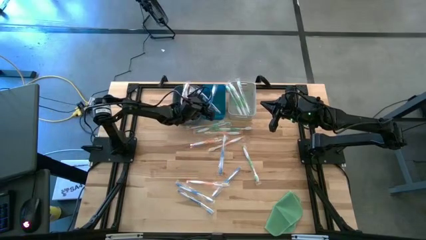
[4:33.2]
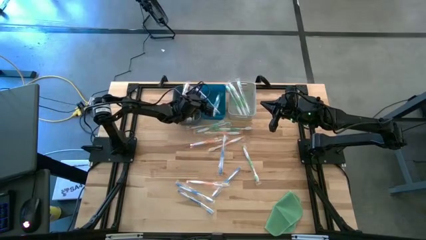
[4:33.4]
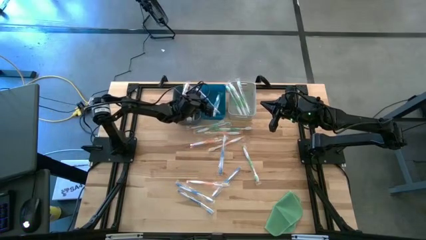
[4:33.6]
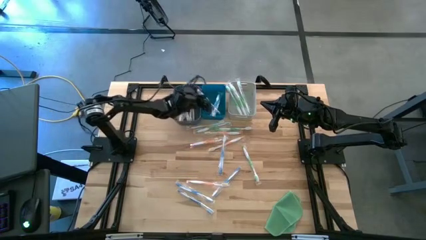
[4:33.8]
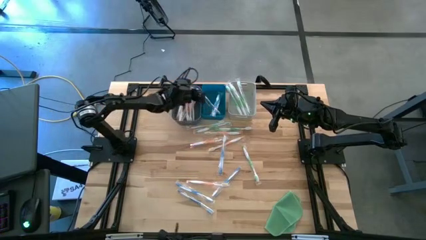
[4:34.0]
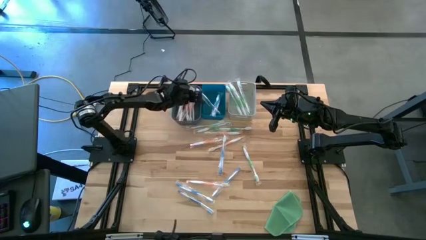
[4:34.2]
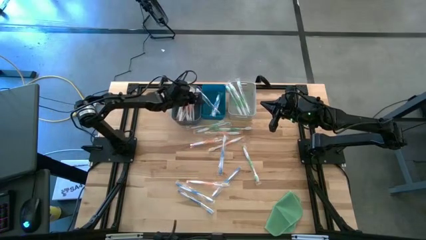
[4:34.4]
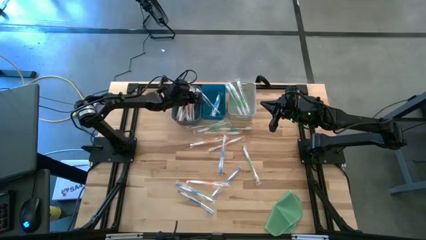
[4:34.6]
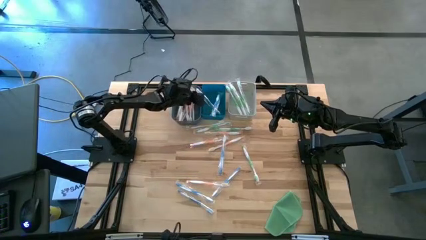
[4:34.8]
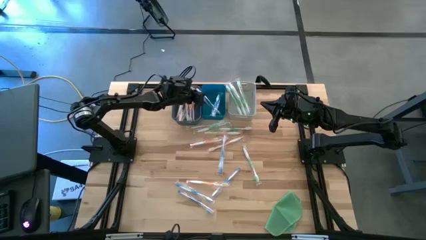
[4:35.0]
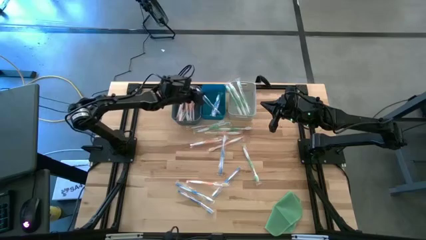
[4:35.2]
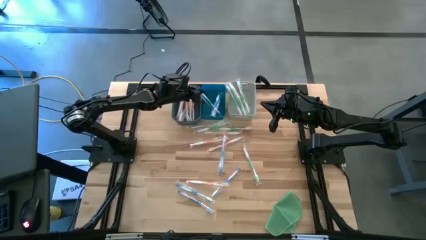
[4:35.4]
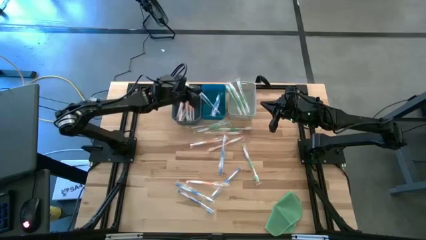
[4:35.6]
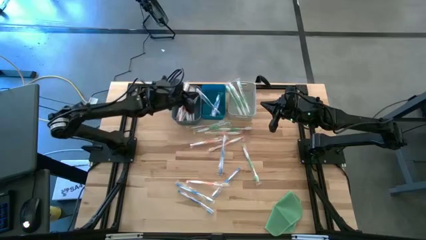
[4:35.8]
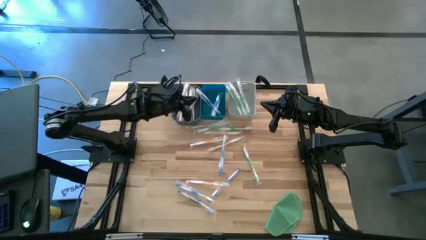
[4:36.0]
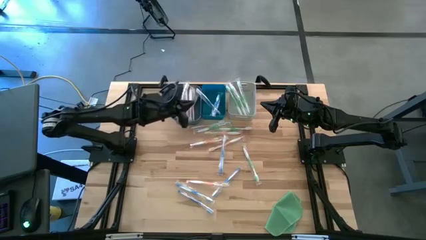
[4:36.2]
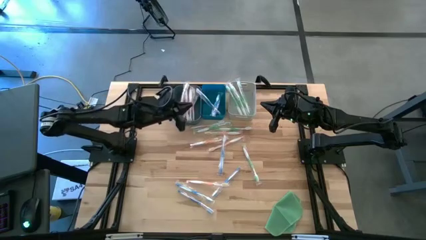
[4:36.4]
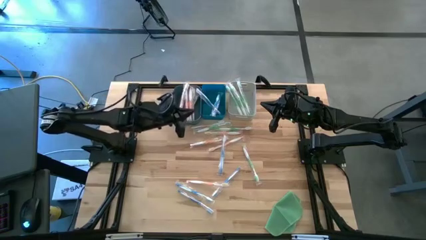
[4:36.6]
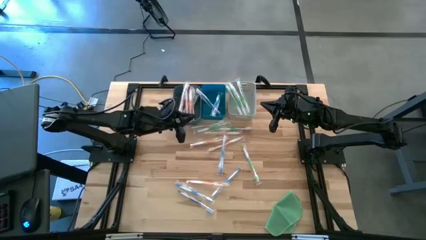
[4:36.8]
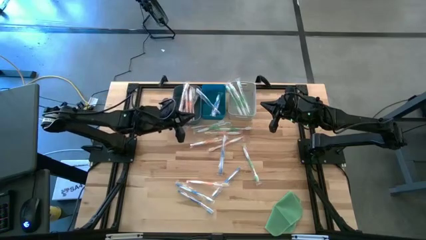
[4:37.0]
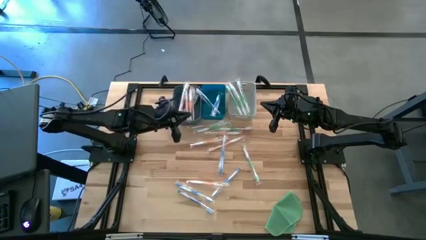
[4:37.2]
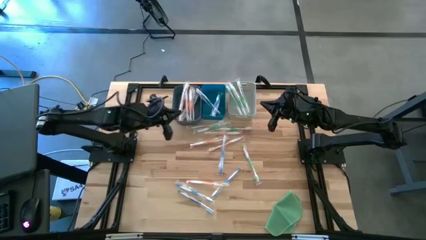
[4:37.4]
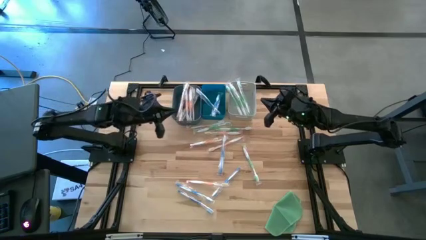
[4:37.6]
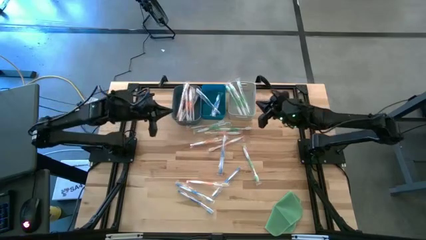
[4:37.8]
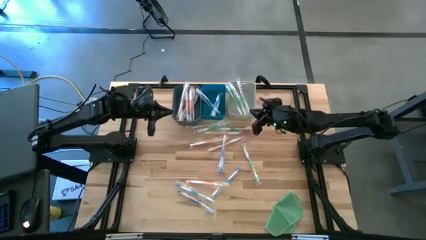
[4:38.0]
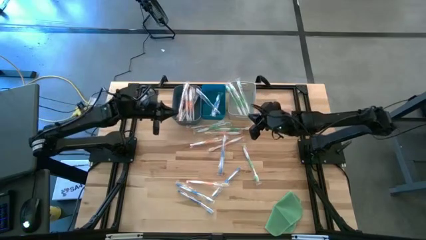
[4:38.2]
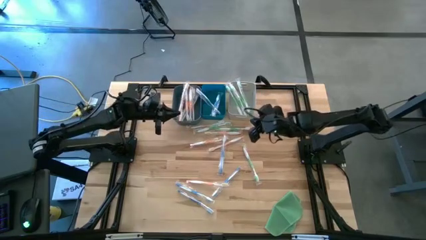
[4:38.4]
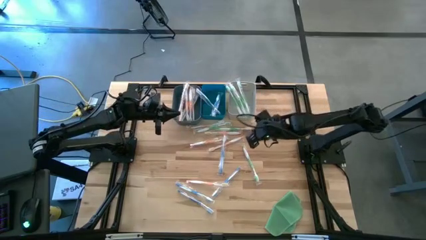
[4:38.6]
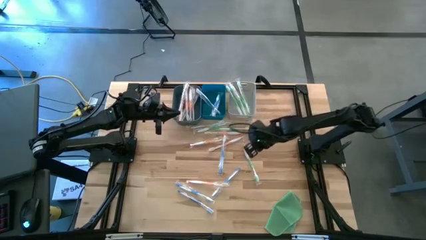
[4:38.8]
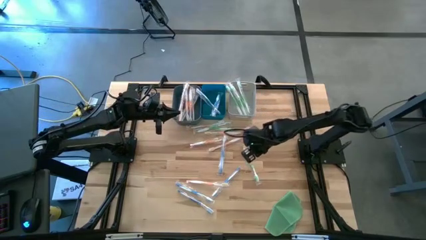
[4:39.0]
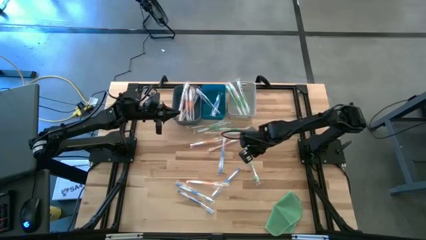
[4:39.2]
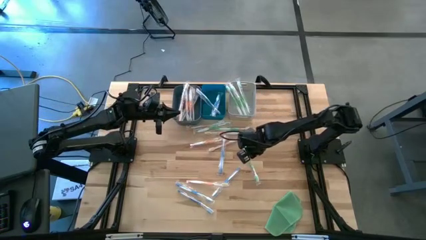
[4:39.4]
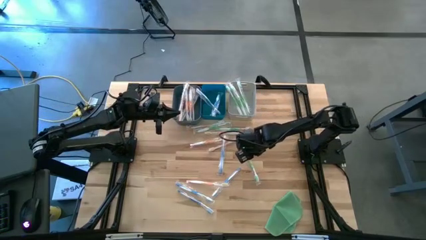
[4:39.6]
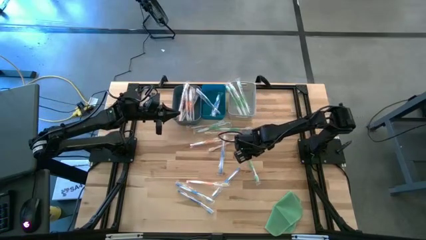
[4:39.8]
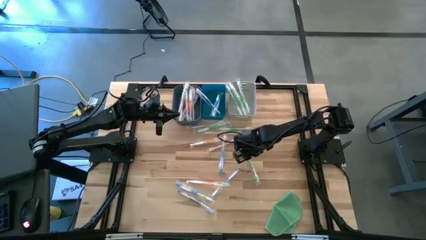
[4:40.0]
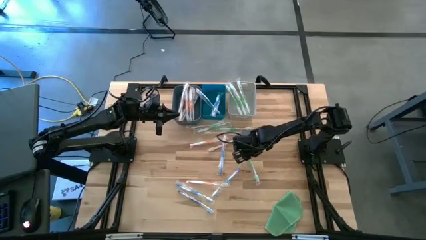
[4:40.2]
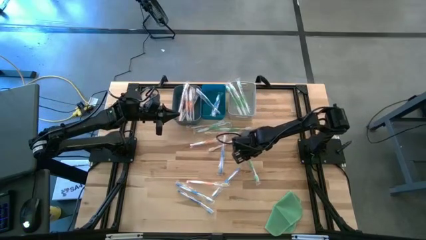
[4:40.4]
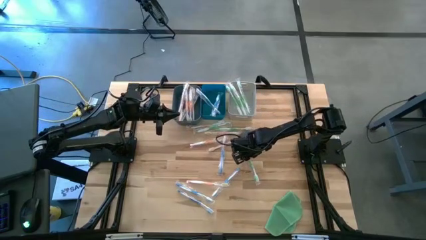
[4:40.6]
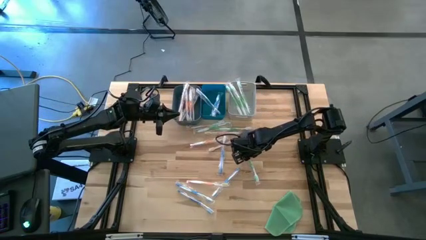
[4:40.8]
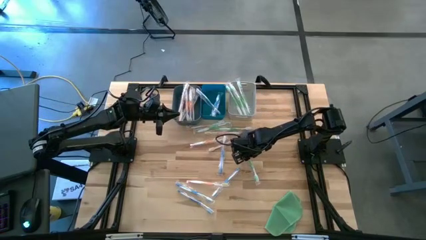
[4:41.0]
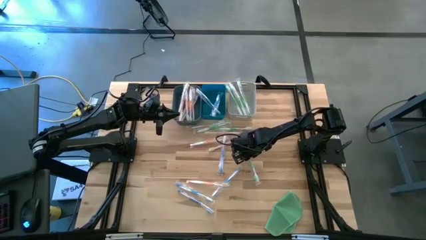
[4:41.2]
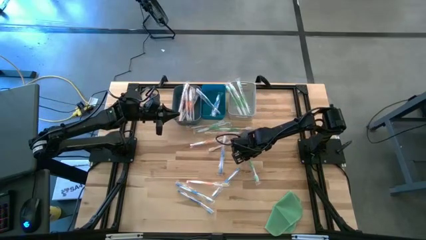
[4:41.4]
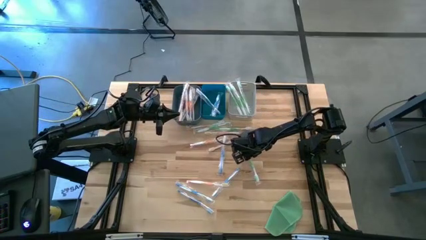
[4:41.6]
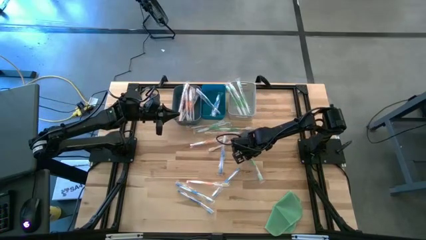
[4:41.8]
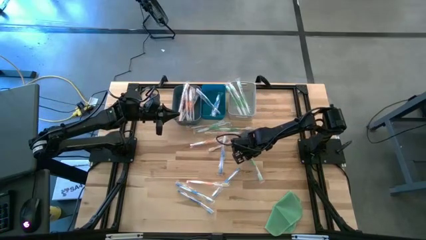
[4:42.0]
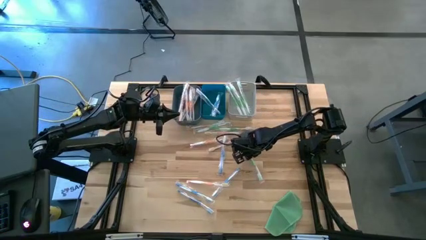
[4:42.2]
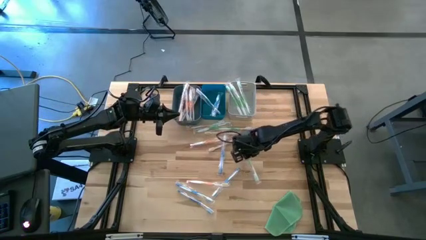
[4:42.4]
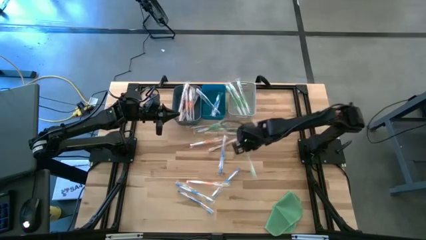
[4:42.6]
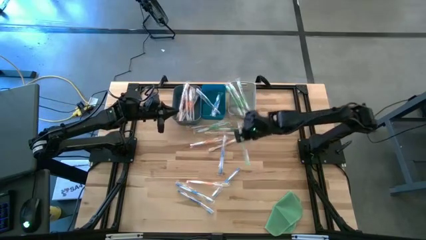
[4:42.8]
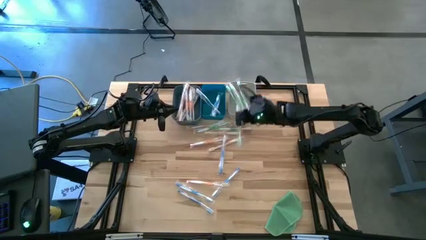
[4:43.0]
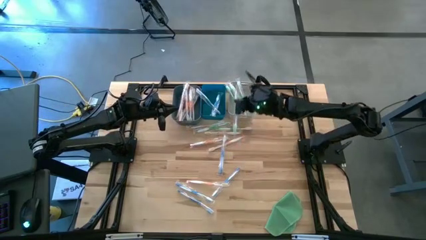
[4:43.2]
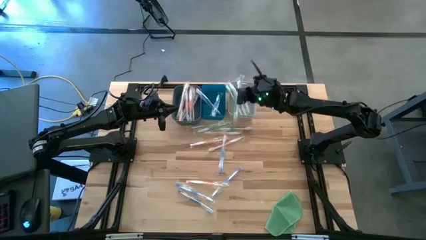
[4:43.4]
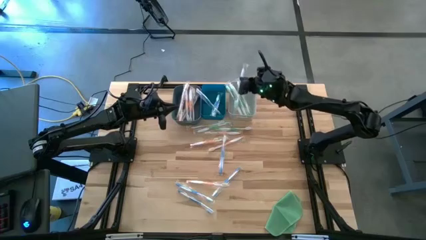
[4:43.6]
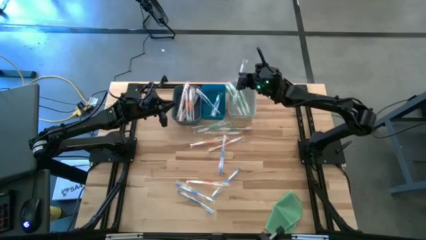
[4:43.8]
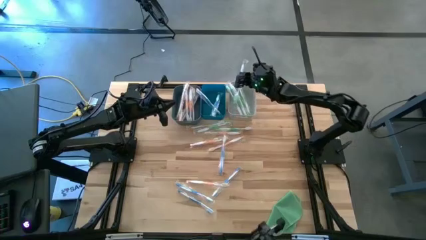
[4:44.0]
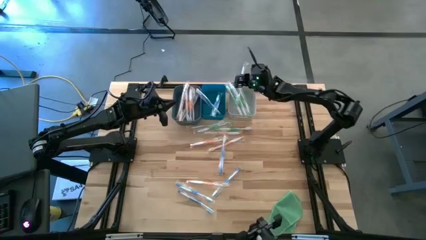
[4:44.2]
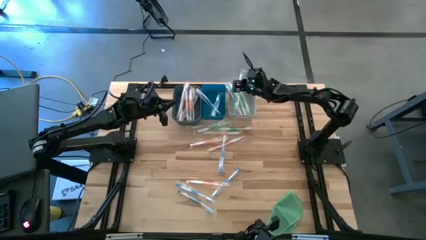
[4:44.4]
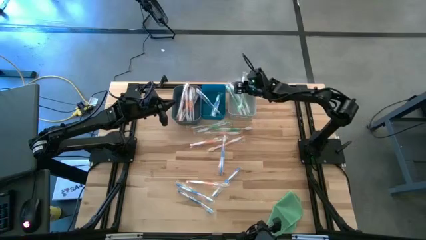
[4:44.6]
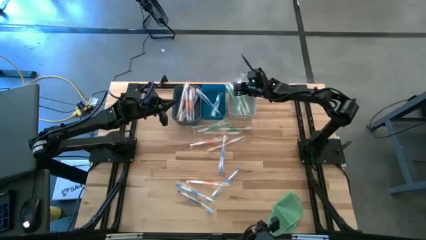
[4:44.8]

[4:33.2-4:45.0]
Task: Pick & Place Toothbrushes
Put the green toothbrush into the white bin

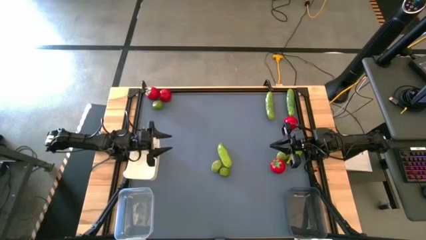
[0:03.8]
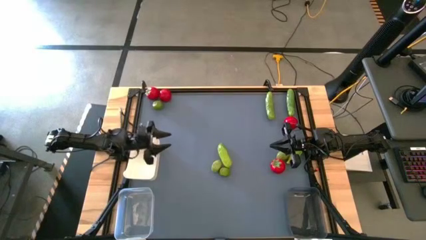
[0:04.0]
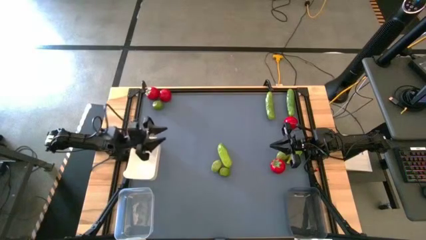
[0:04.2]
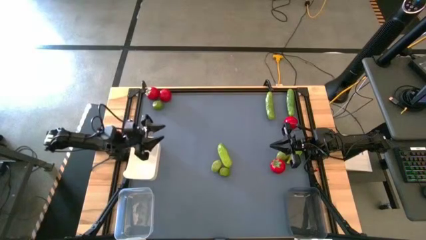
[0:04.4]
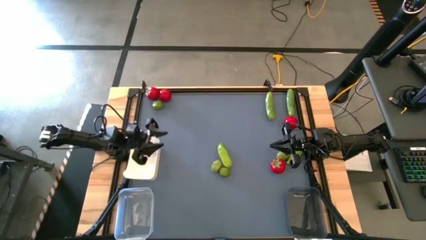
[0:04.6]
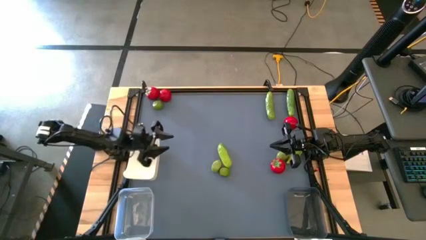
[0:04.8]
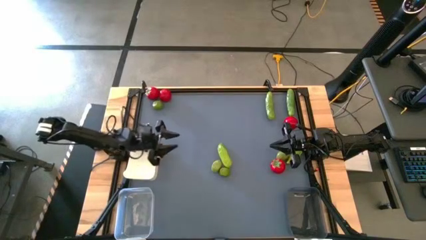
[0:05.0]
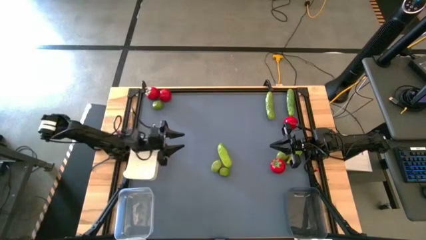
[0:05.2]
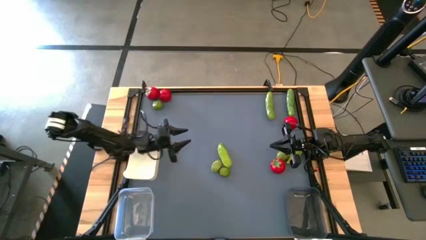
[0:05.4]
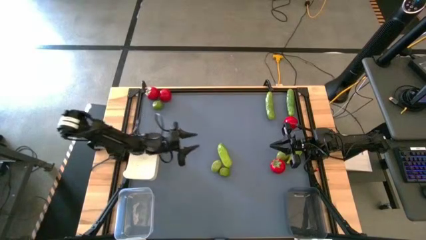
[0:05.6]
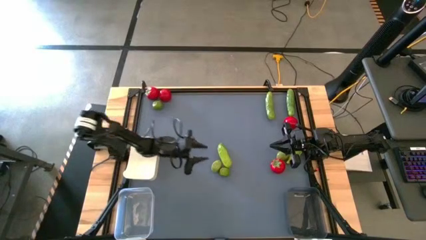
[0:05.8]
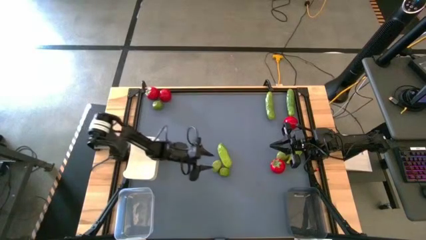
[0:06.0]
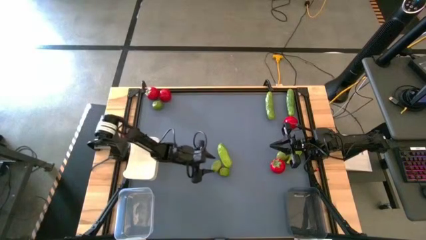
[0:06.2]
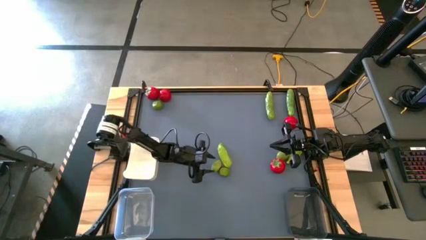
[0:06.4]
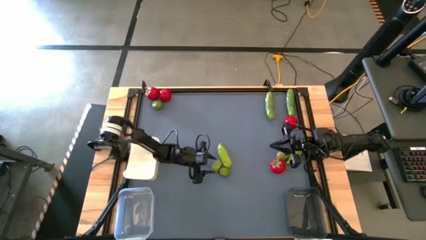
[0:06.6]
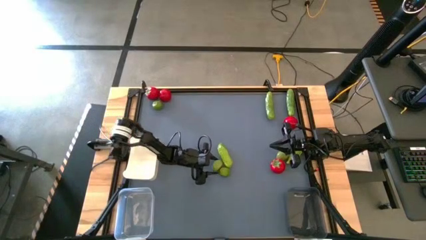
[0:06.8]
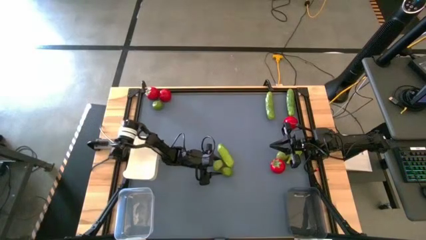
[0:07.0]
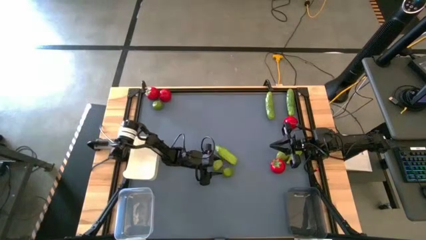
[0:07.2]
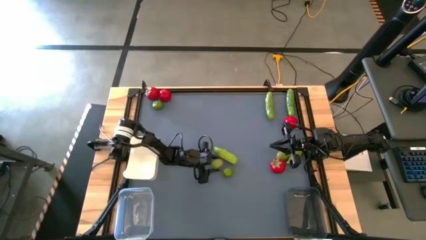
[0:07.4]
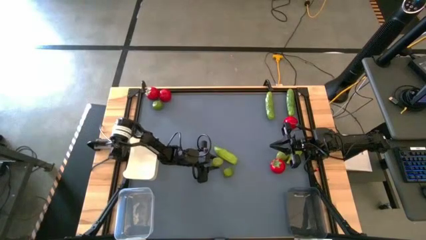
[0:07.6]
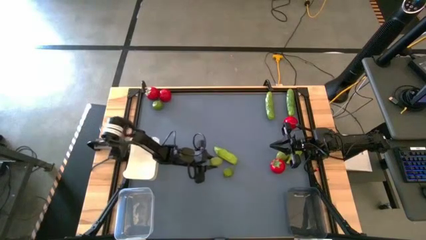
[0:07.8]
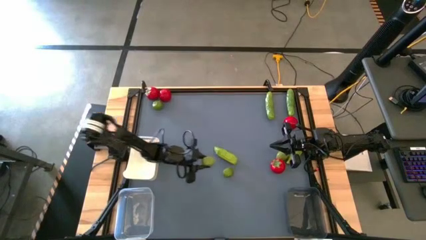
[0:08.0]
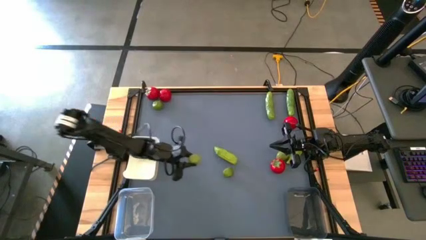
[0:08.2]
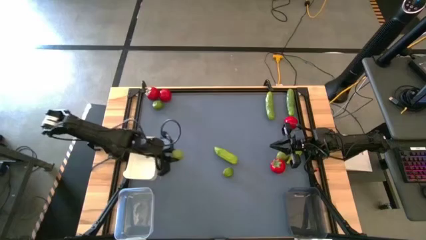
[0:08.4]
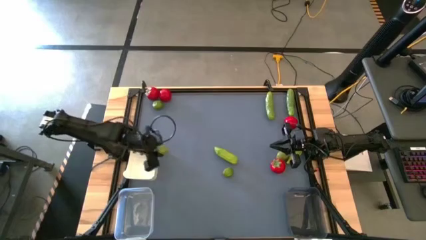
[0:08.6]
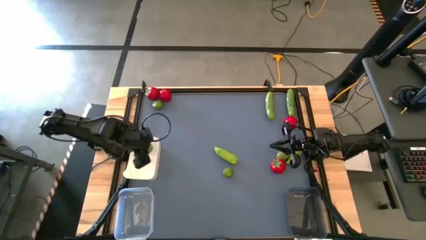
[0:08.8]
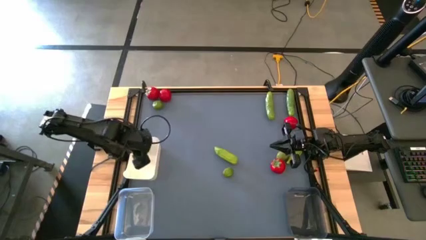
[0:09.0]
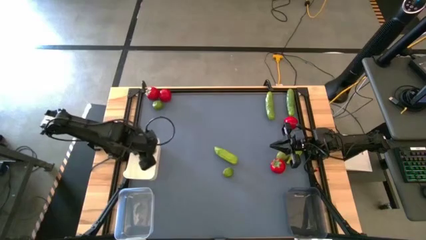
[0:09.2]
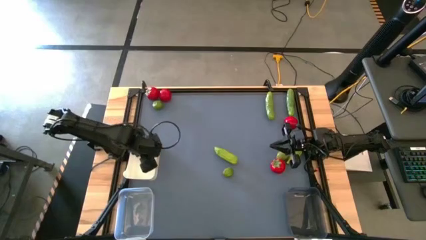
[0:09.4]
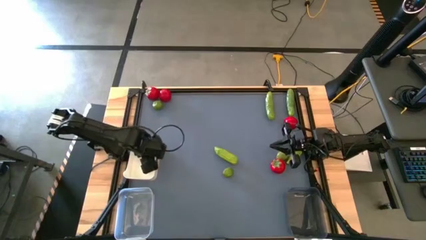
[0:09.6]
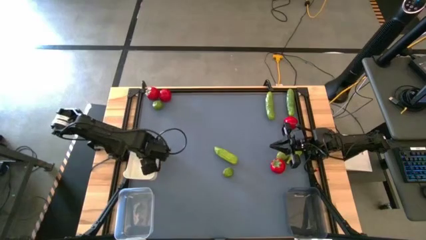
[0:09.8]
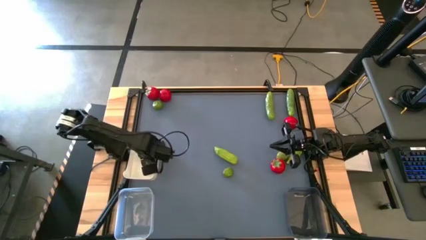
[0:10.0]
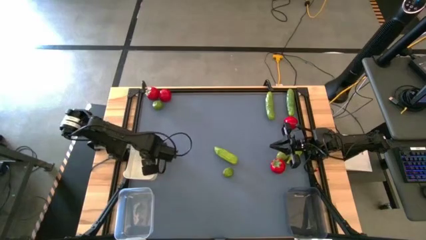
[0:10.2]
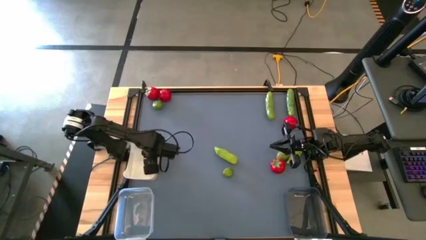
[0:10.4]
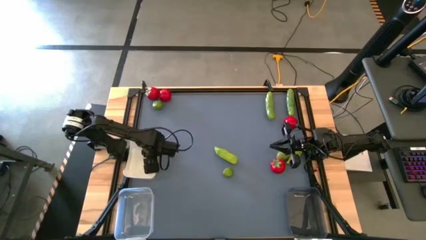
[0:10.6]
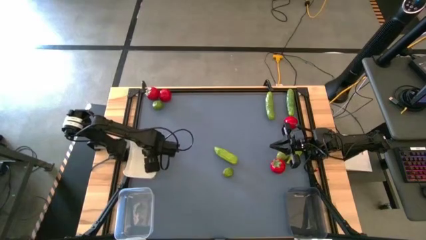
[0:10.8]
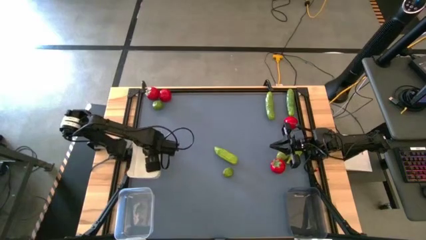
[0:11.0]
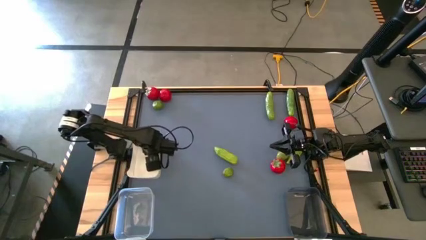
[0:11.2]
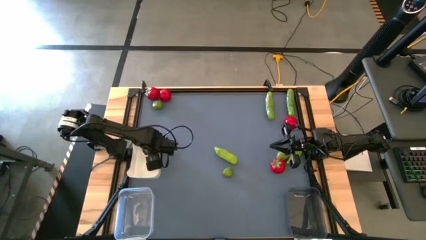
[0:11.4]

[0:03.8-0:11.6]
Task: Sort produce into baskets
Put the green lime into the white bin
